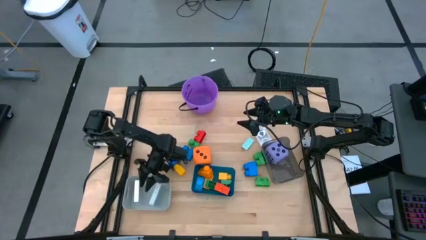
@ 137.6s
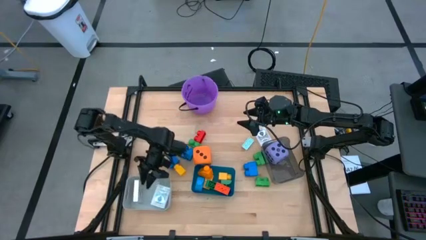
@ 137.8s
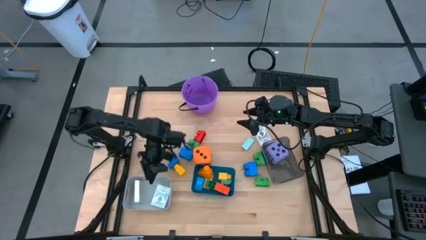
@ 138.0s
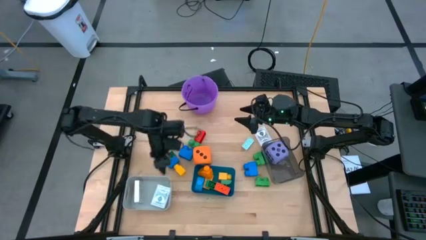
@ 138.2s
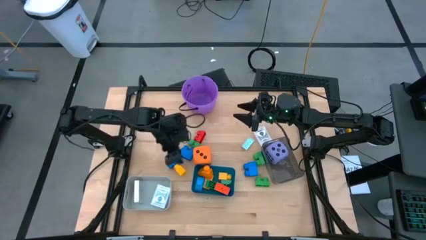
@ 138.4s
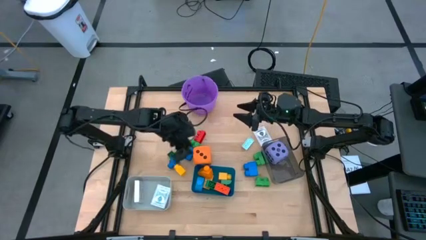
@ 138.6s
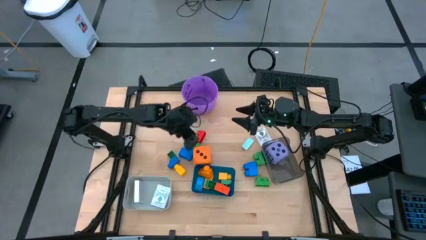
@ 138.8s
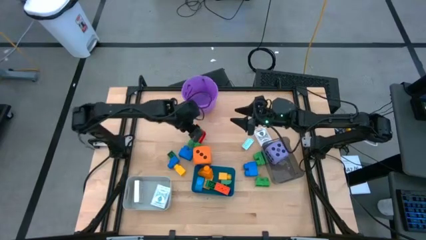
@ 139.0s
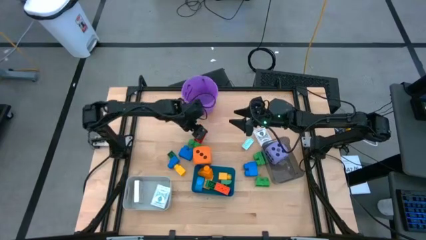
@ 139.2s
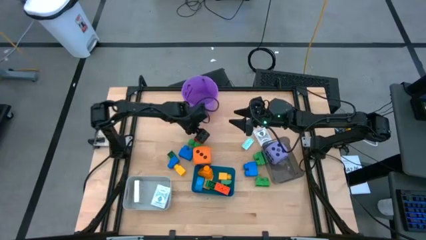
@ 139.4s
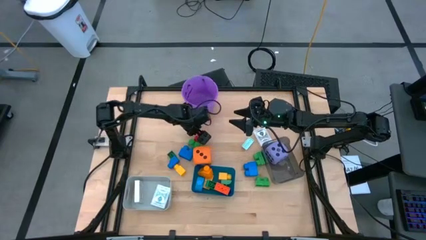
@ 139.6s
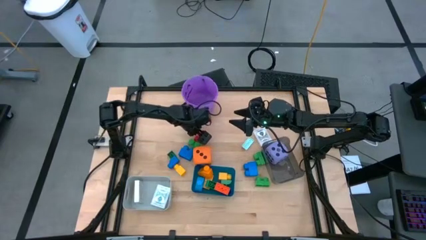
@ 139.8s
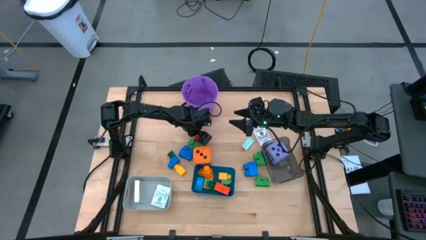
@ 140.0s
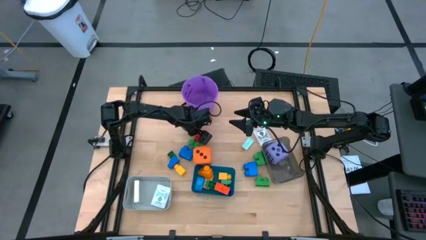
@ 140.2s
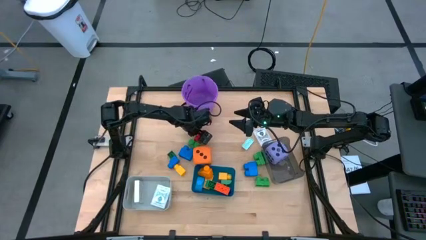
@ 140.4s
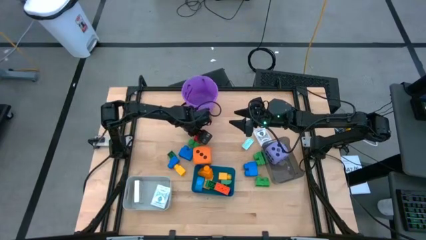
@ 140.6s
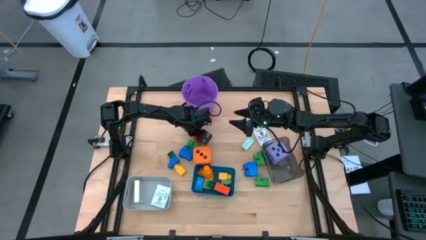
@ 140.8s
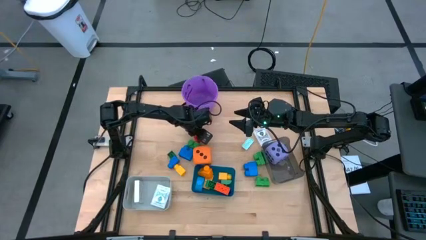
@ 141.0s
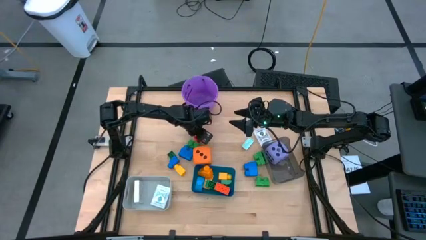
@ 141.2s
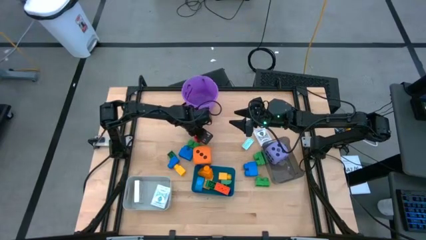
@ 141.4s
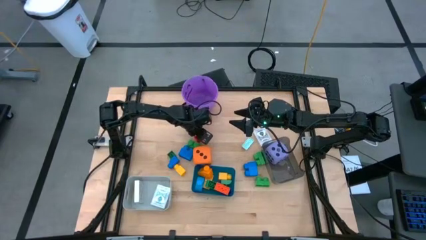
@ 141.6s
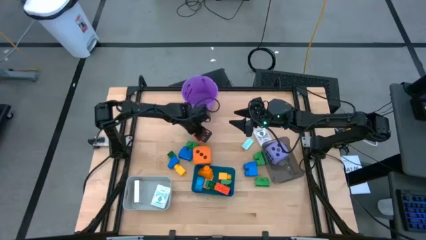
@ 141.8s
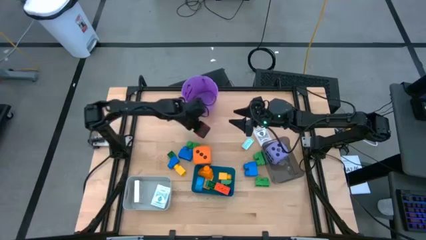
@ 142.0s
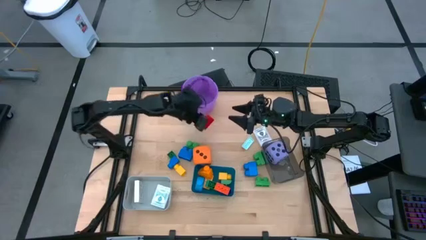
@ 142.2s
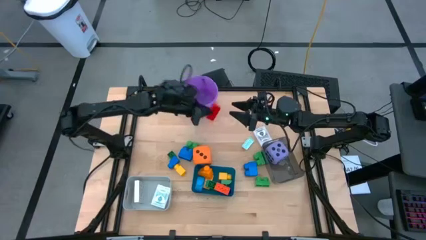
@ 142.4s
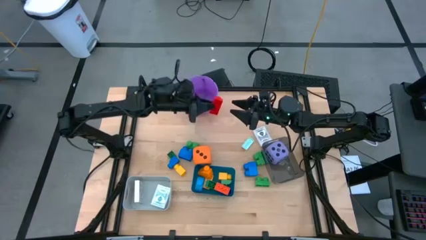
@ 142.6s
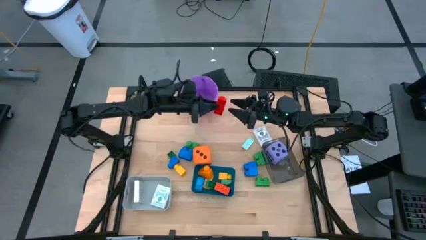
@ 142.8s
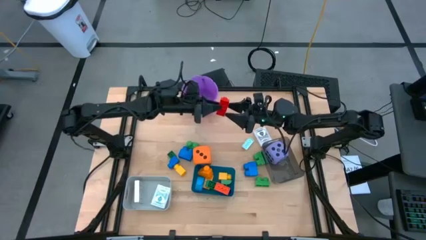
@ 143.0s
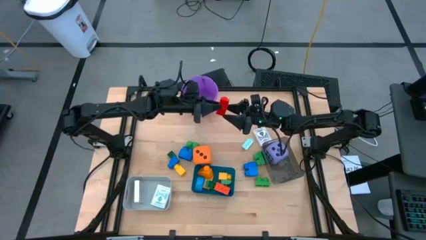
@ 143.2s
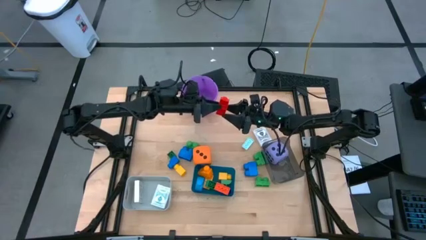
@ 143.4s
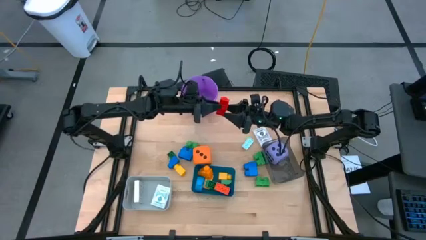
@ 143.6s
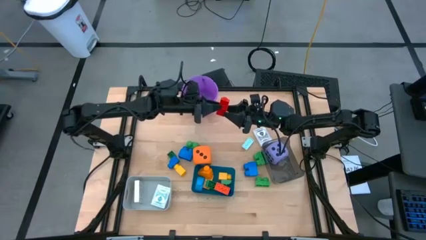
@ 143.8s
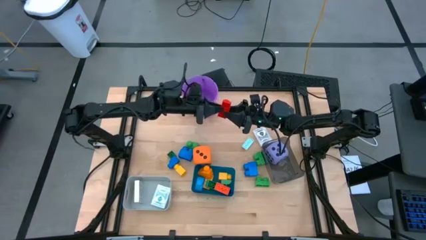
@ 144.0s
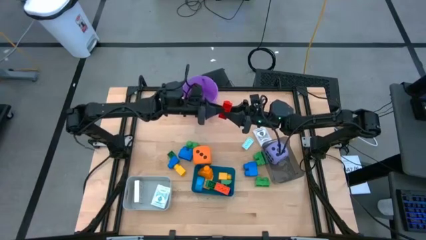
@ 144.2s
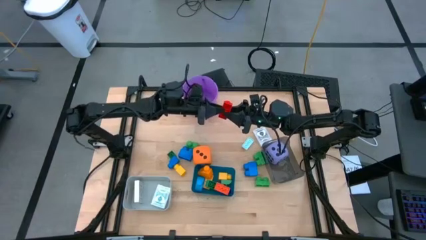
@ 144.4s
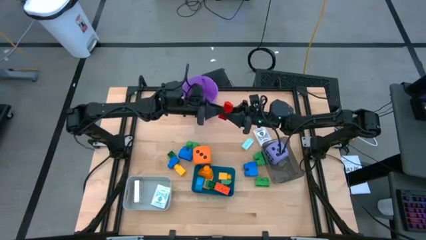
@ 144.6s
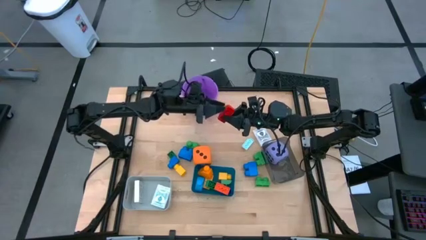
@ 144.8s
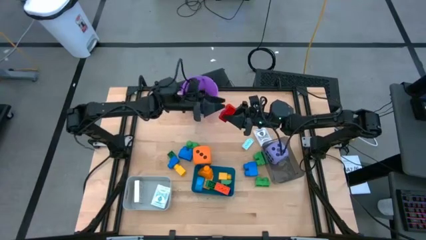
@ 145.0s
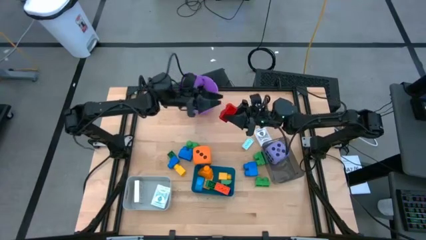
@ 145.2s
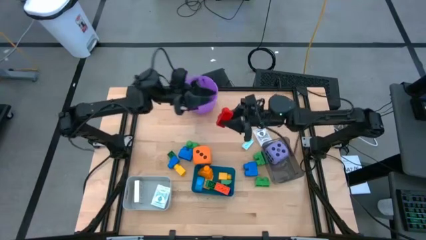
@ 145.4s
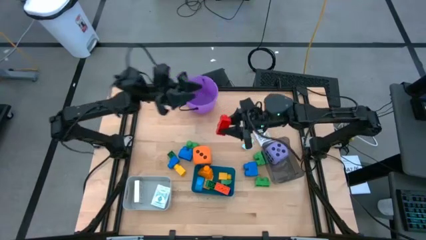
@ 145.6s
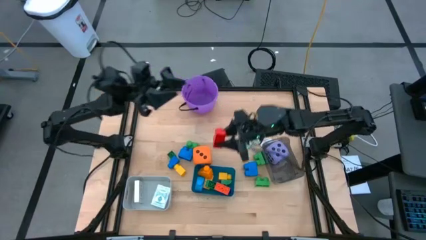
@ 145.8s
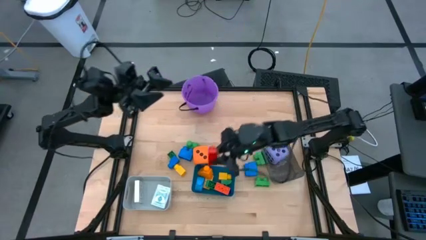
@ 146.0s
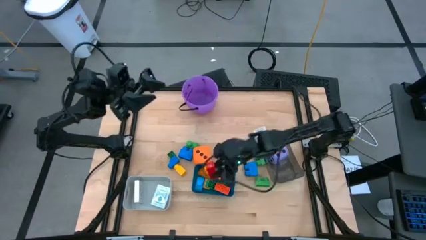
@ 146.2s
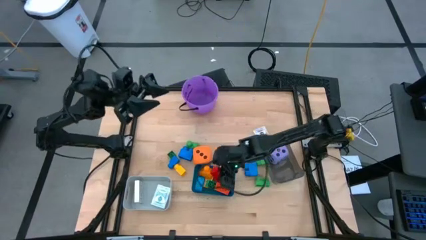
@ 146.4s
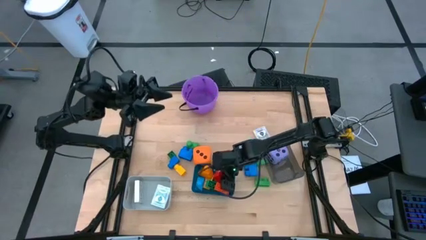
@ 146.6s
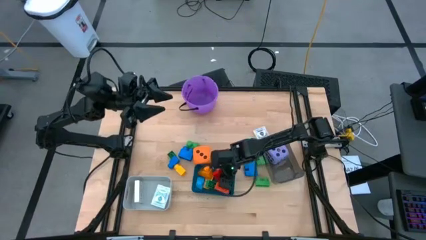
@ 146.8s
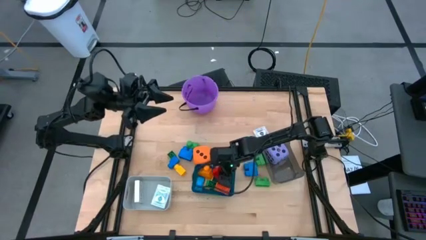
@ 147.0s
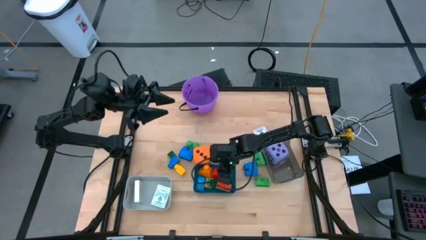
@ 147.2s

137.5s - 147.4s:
Task: Pick & Place Toys
Put the red game piece into the blue bin

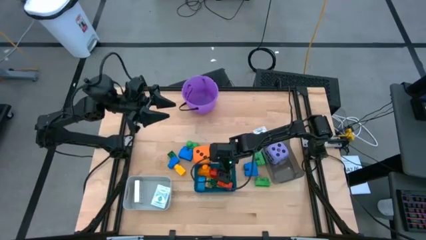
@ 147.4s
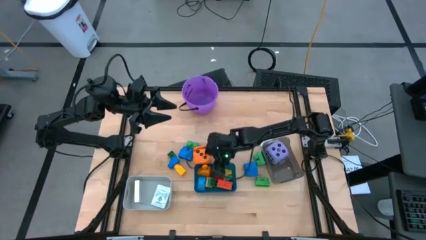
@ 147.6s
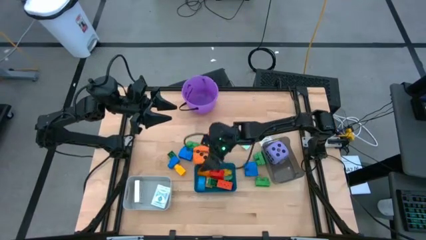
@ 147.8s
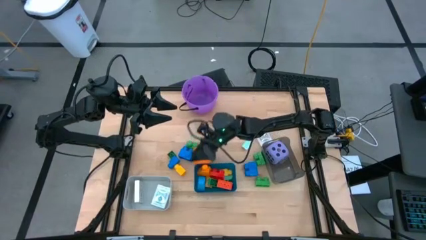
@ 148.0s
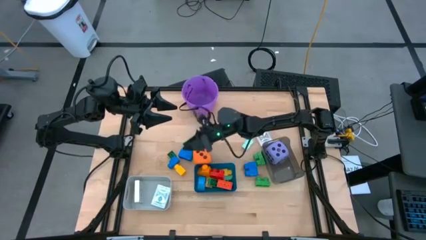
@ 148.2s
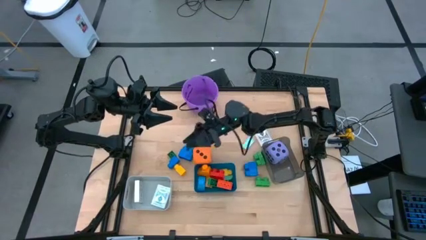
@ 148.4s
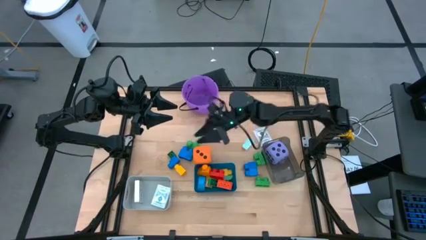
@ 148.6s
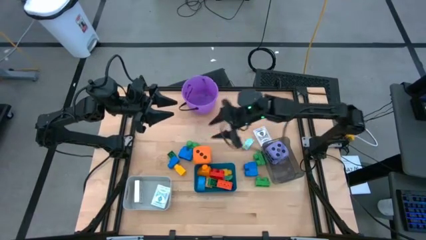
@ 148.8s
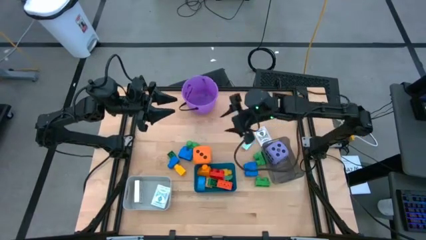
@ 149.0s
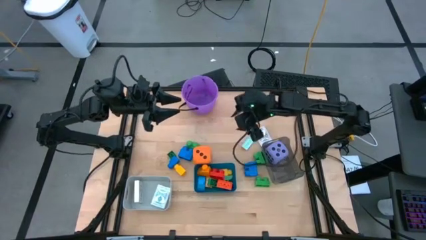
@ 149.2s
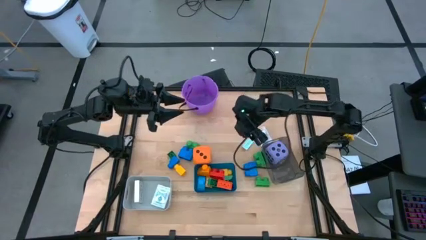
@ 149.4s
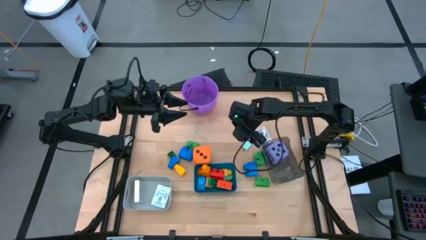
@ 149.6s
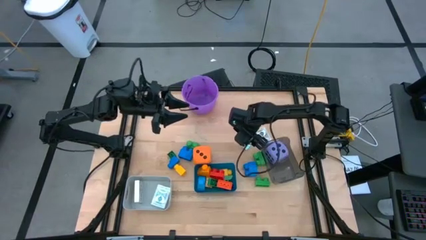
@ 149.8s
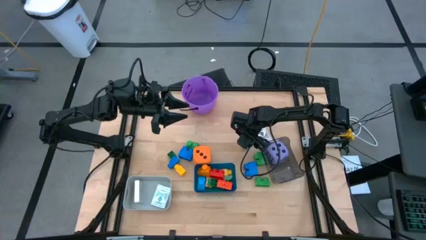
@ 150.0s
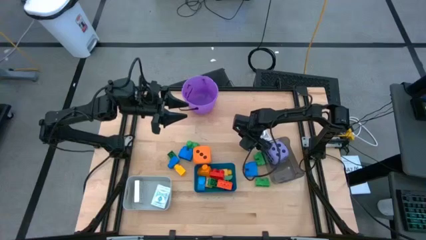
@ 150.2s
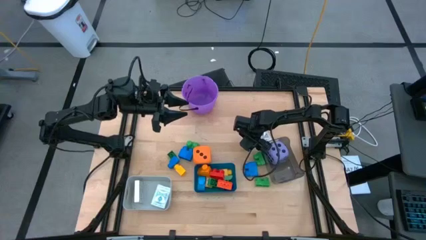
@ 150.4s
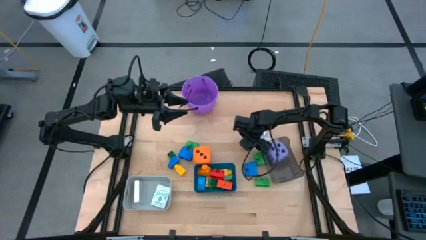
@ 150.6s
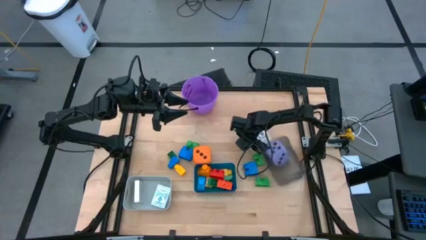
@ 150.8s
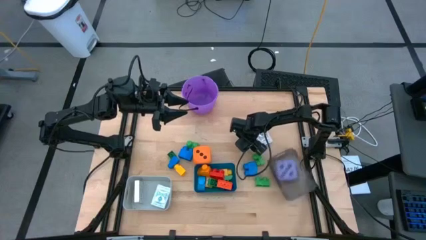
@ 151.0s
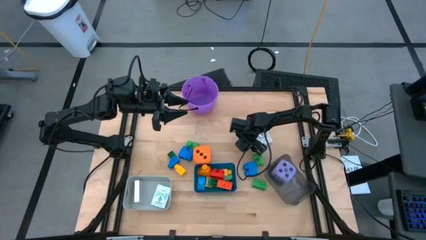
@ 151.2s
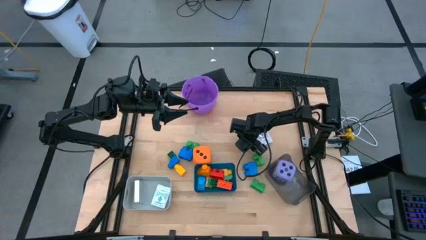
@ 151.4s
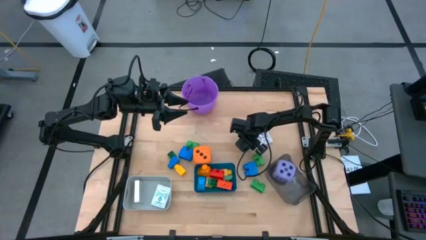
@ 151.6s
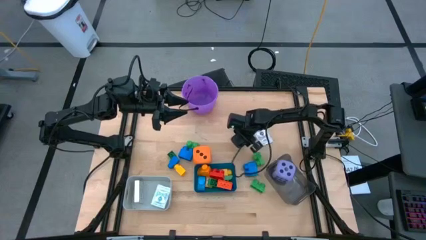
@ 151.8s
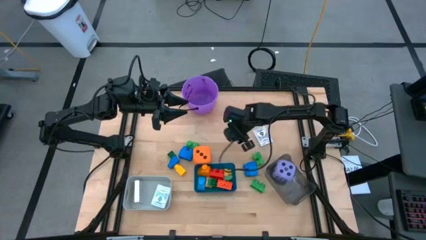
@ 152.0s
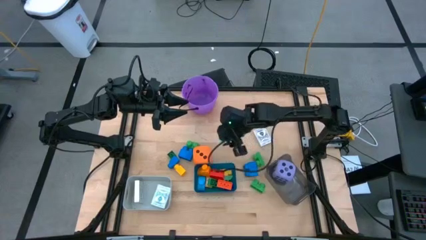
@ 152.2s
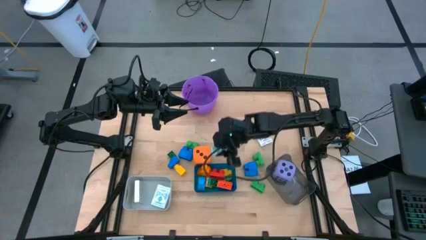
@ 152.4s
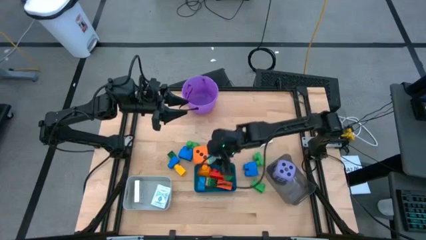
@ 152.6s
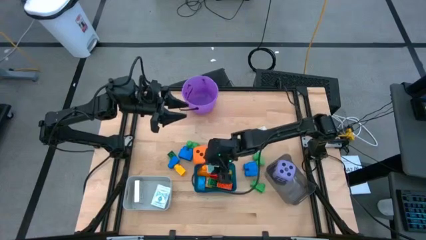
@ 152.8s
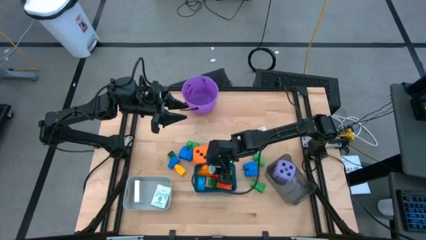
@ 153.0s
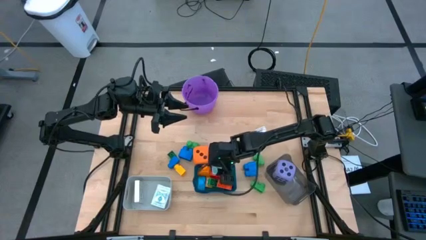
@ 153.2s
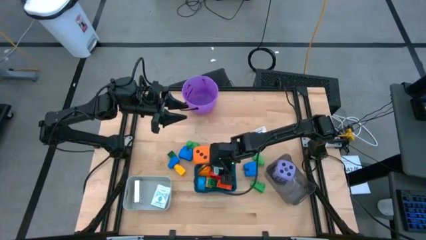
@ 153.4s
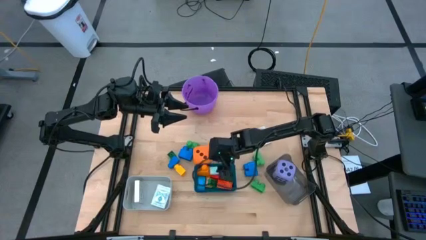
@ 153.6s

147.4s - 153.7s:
Put the light blue game piece into the blue bin

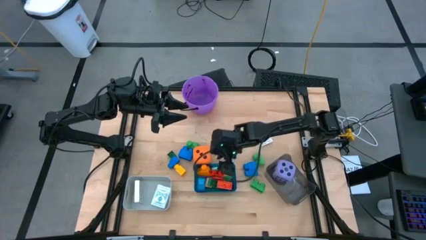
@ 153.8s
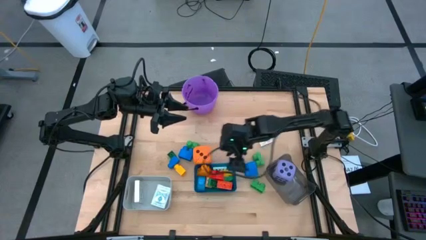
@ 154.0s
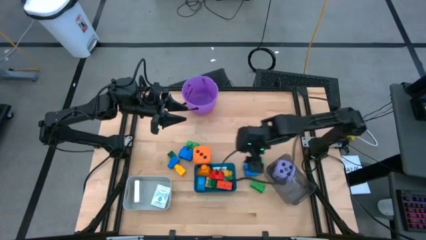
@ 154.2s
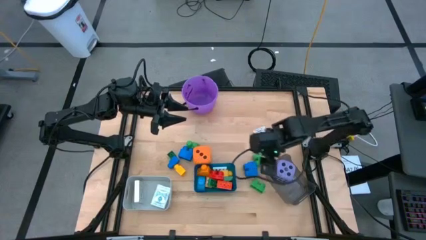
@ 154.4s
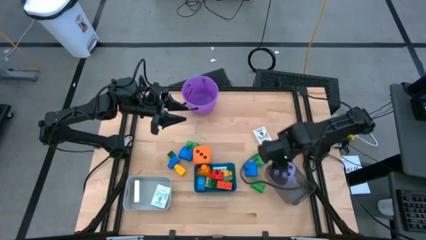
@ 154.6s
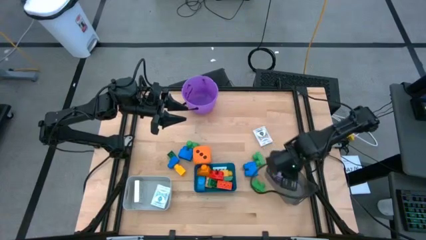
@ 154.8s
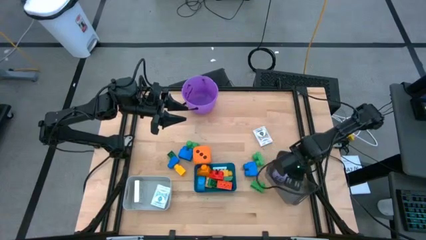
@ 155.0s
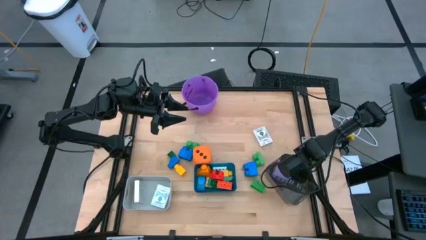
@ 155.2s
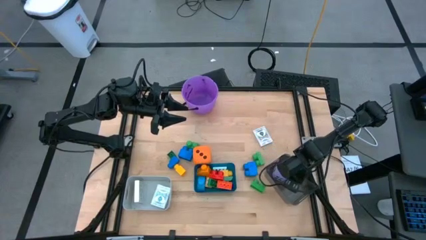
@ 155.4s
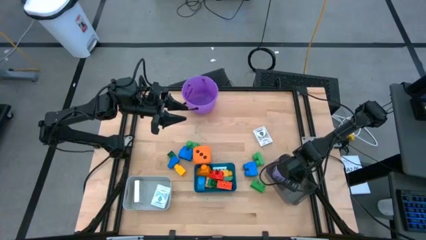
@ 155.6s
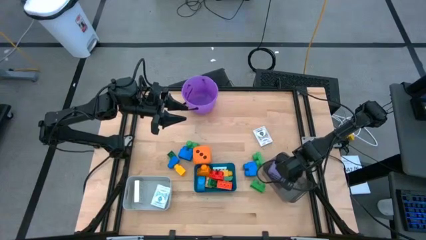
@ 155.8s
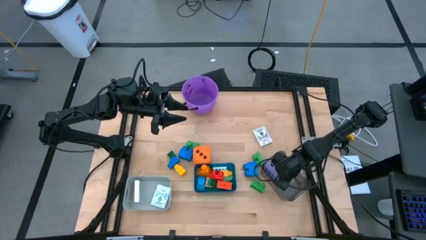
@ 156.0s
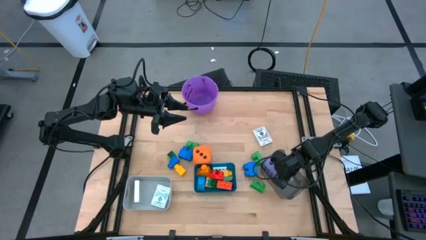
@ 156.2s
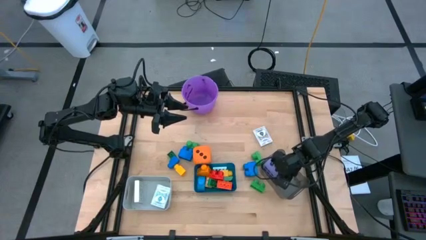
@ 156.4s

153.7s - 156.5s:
Adjust the purple dice in the bin
